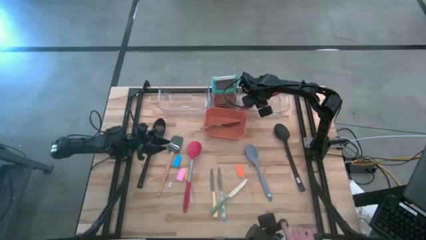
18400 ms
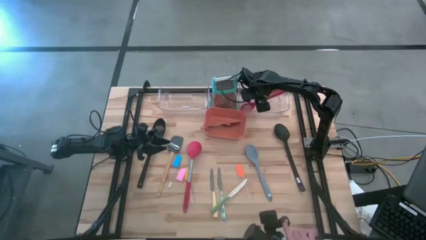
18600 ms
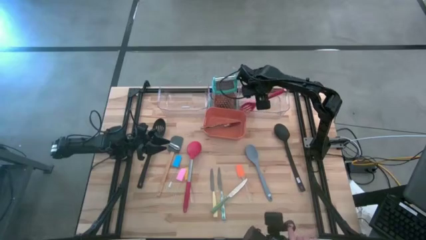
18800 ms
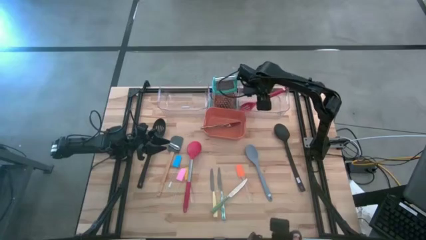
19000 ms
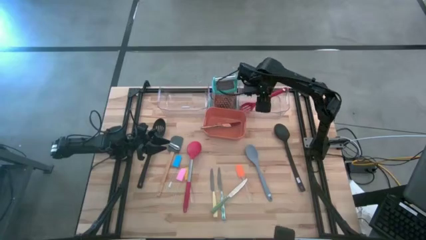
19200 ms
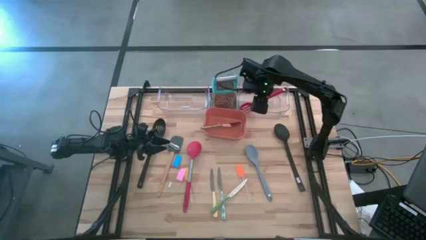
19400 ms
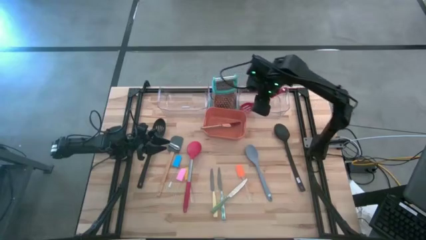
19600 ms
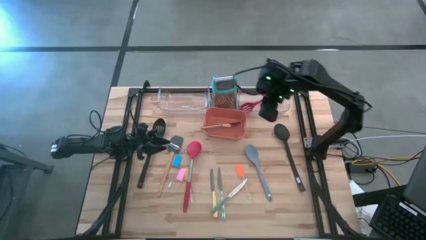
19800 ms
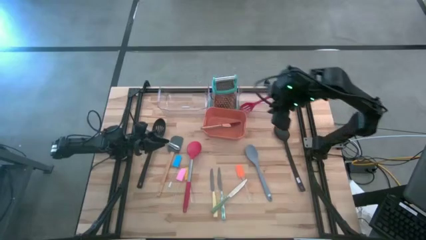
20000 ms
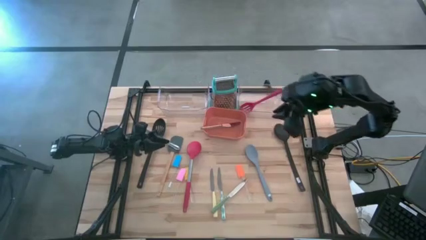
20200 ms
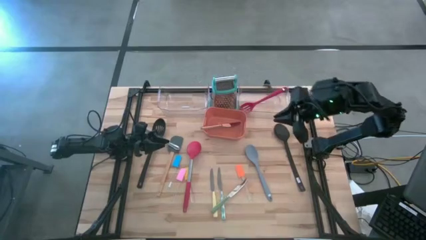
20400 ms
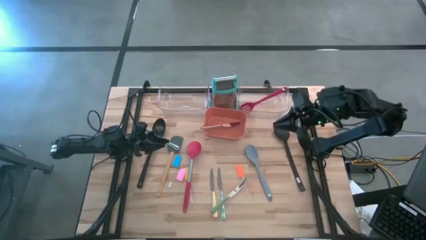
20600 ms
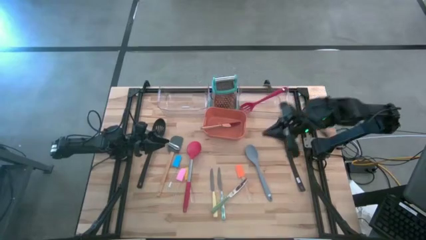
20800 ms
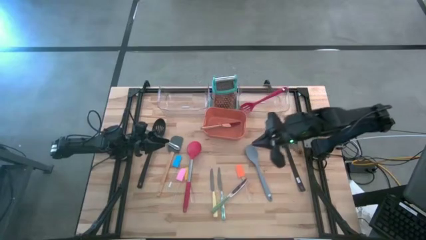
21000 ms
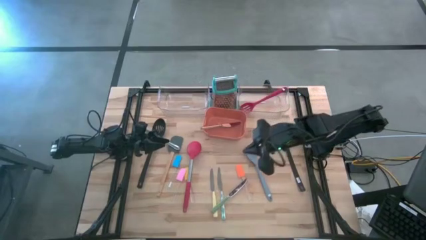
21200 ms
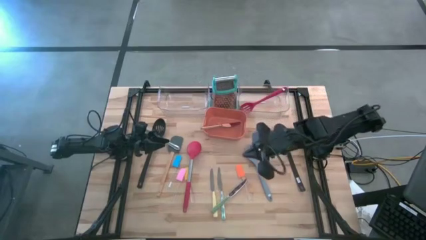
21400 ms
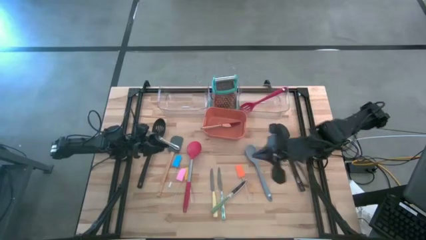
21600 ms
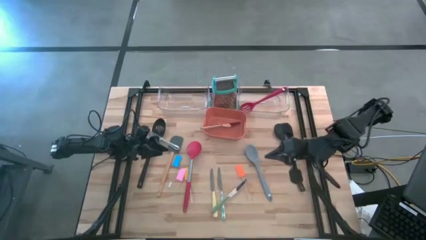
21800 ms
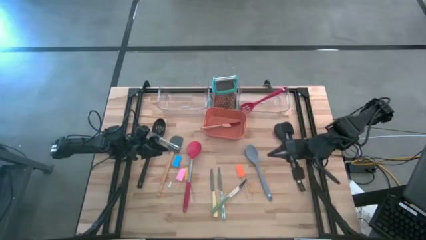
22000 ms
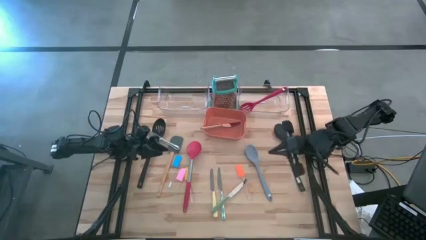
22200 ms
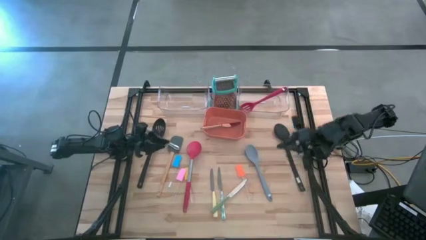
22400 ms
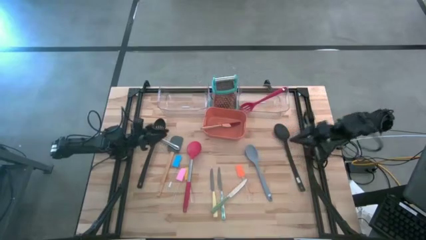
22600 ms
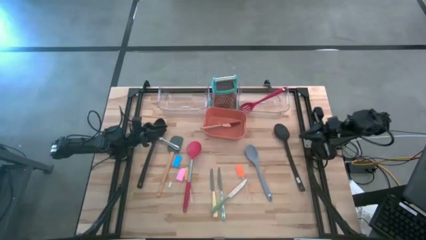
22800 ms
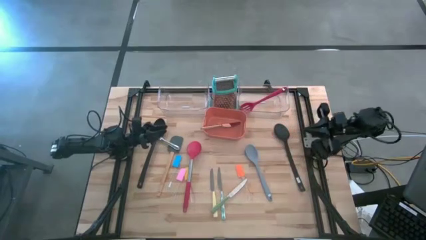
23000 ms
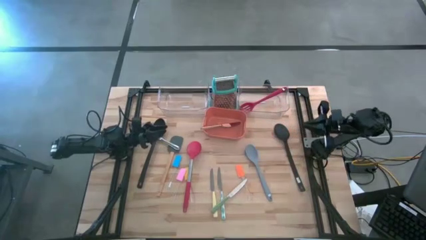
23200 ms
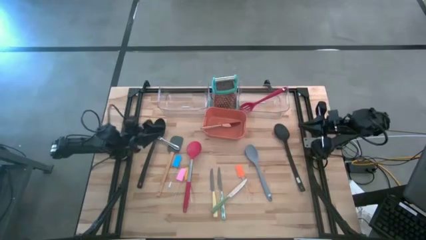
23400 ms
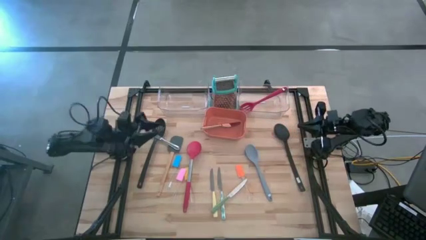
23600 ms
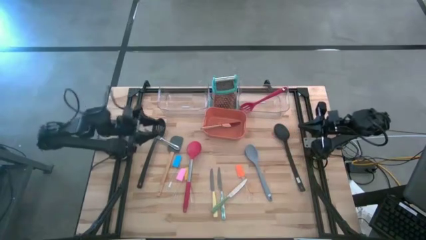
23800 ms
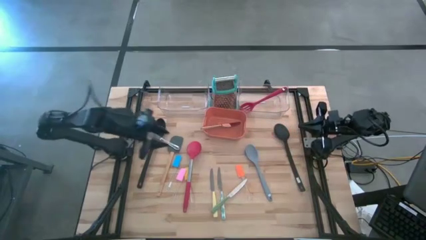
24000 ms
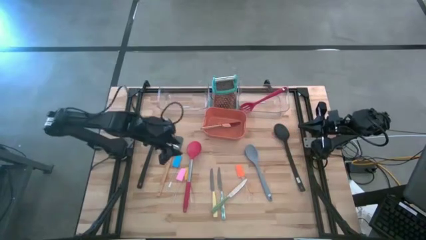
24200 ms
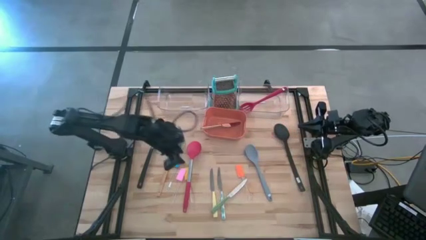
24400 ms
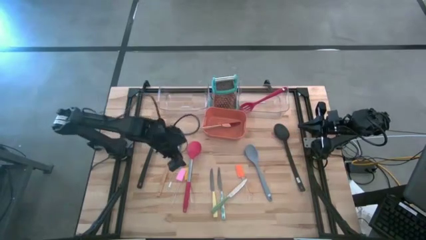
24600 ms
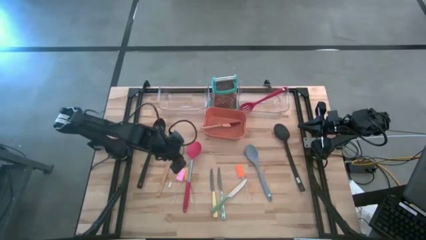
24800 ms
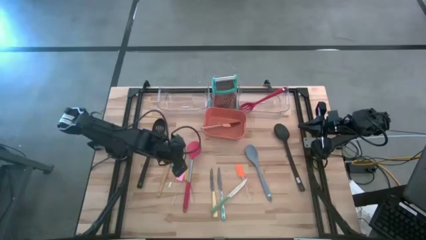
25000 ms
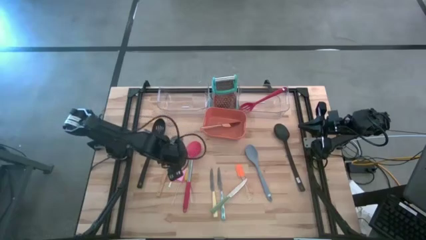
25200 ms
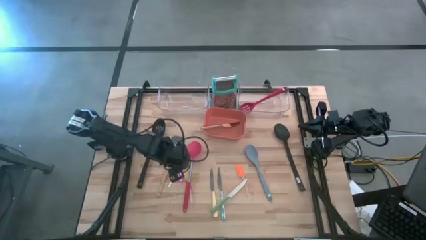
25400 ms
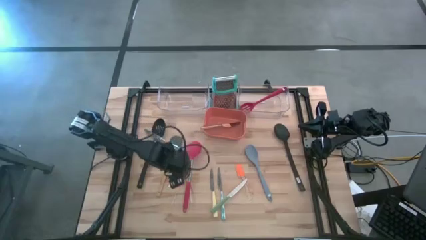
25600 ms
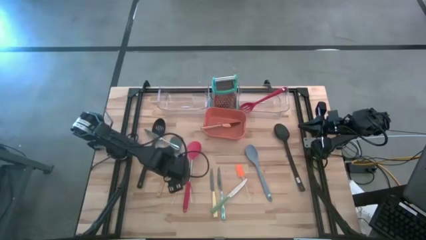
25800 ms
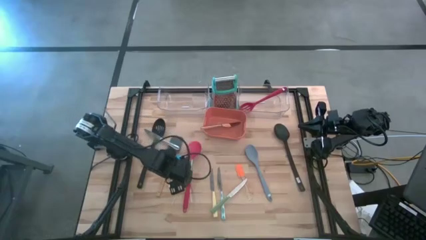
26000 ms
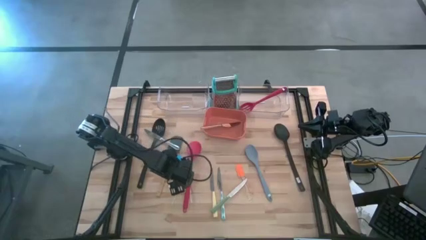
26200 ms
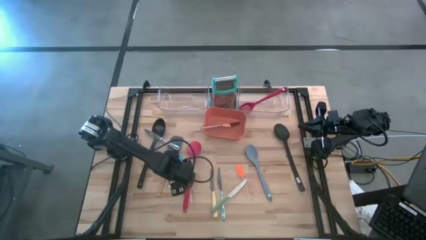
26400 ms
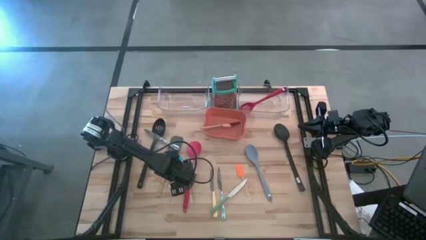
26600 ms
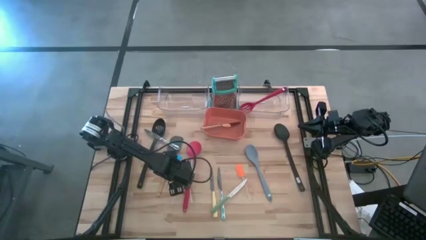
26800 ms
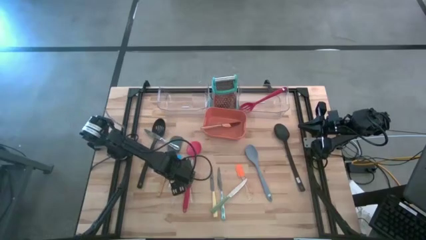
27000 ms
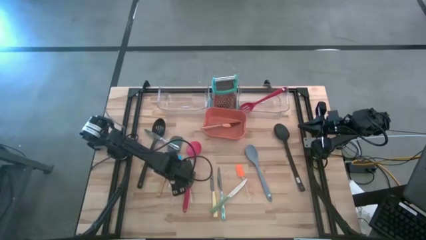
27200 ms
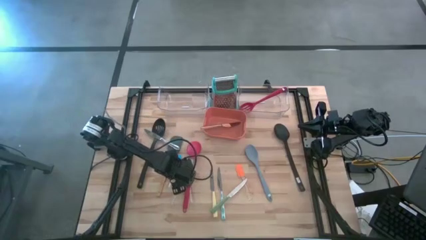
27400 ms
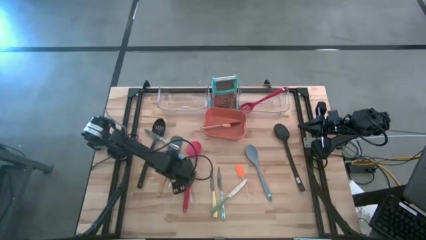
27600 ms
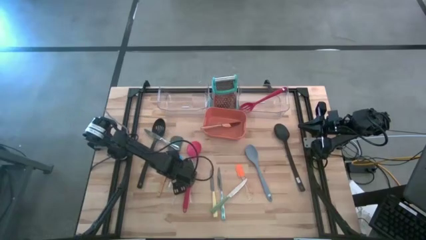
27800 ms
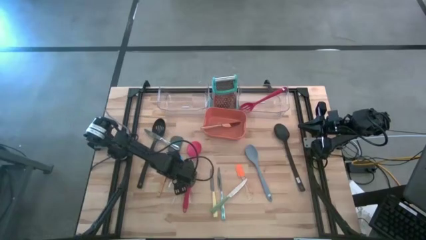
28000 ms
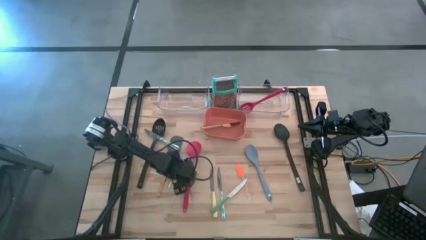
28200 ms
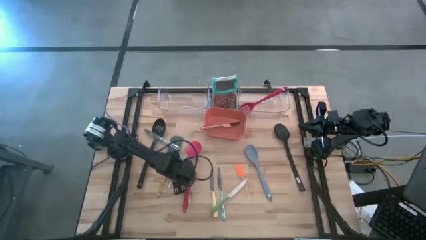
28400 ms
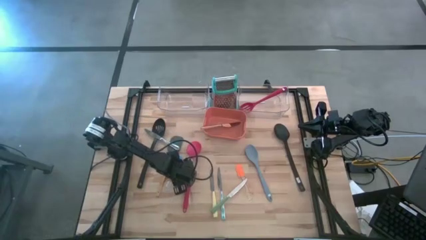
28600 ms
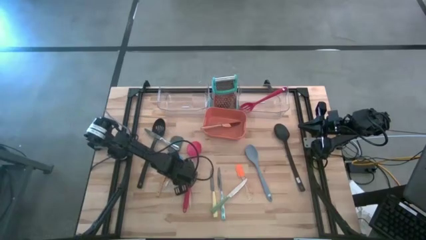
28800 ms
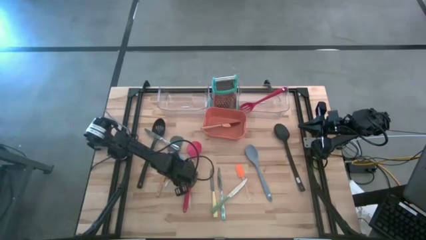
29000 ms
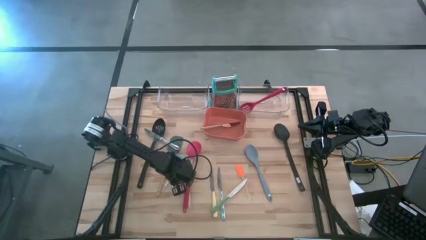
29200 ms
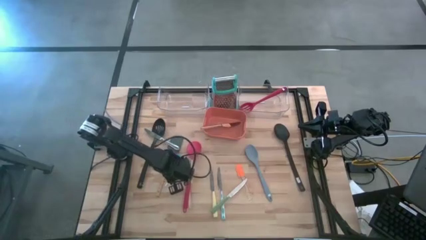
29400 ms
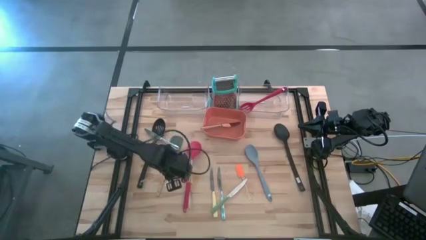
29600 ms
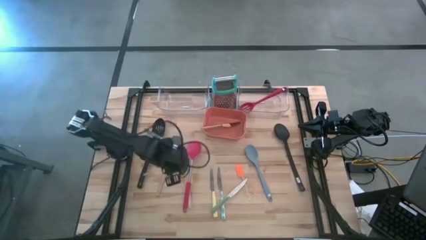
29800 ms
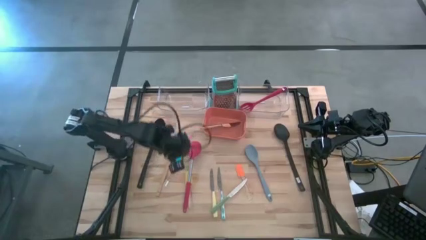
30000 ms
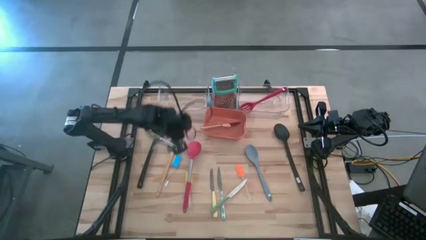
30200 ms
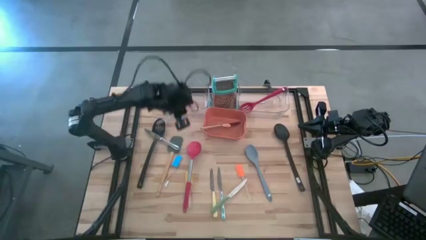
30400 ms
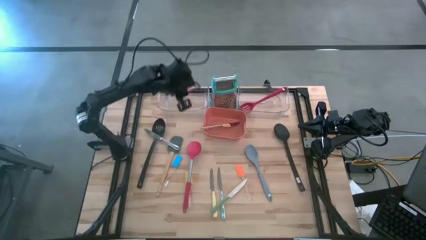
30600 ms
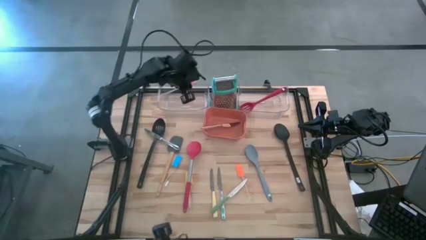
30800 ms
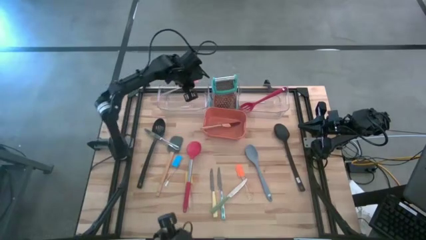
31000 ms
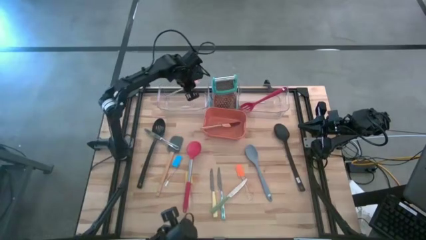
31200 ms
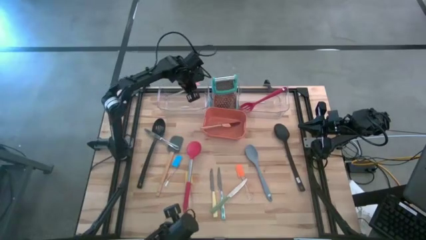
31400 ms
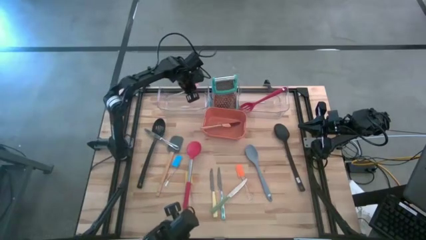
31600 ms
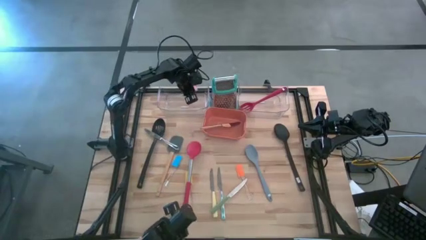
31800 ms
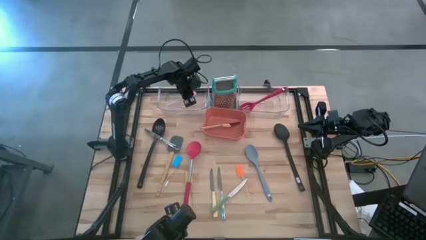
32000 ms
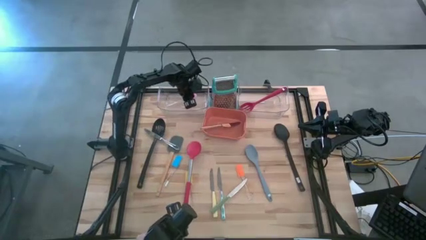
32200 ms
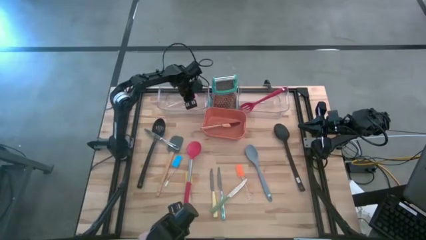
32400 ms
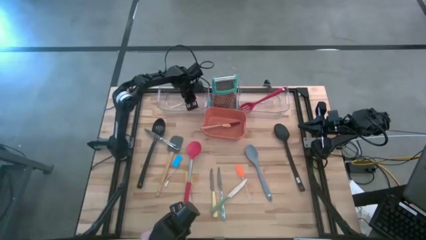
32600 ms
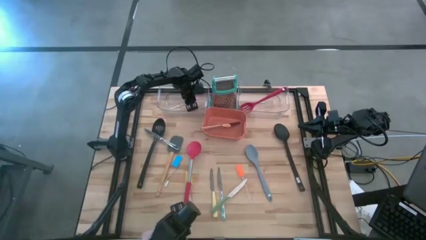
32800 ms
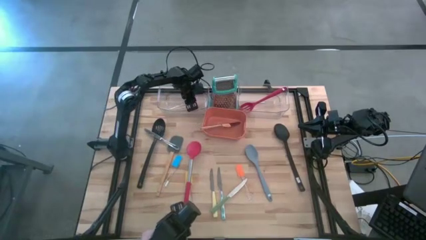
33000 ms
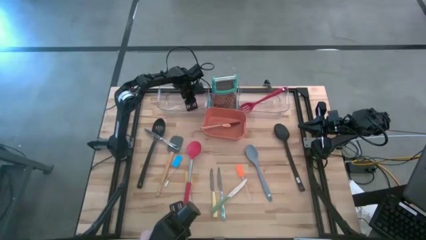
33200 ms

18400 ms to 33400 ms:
Task: Pick & Place Kitchen Items
Put the pink spatula into the left transparent bin
